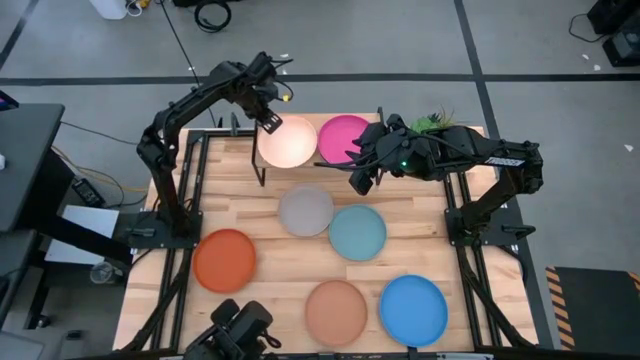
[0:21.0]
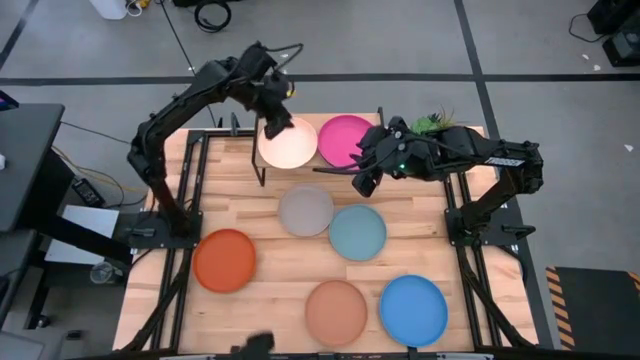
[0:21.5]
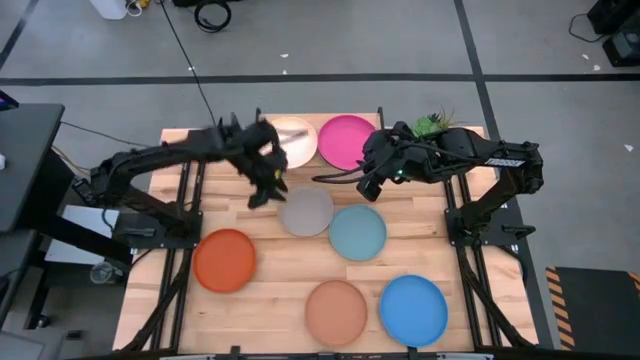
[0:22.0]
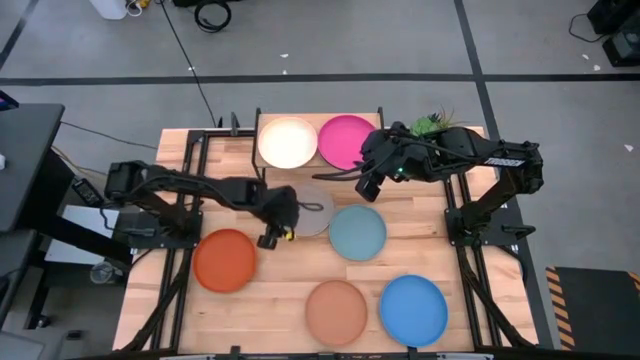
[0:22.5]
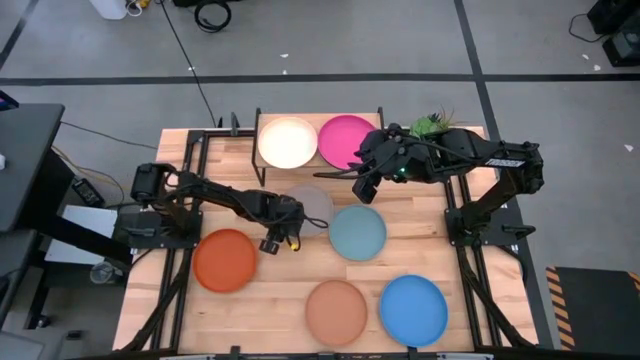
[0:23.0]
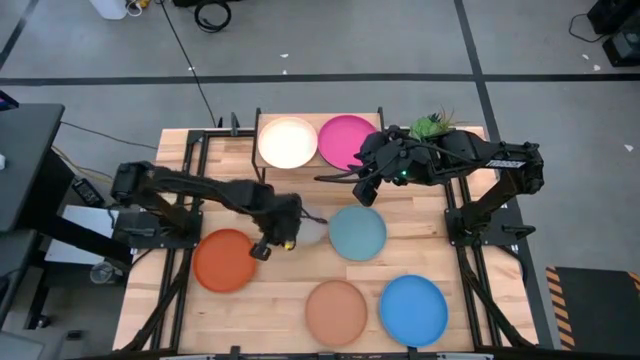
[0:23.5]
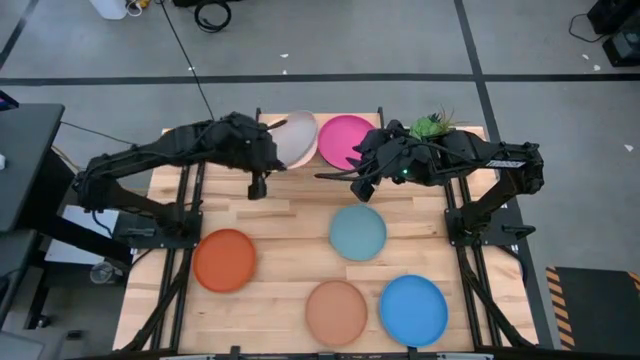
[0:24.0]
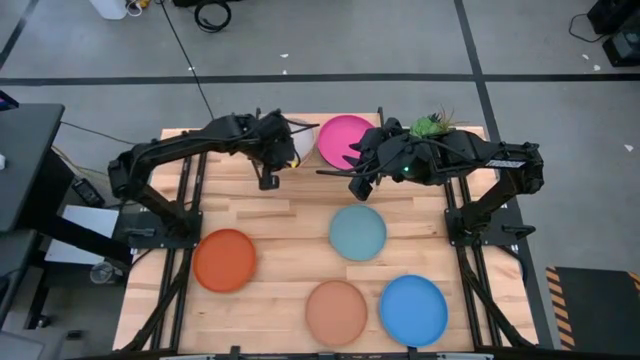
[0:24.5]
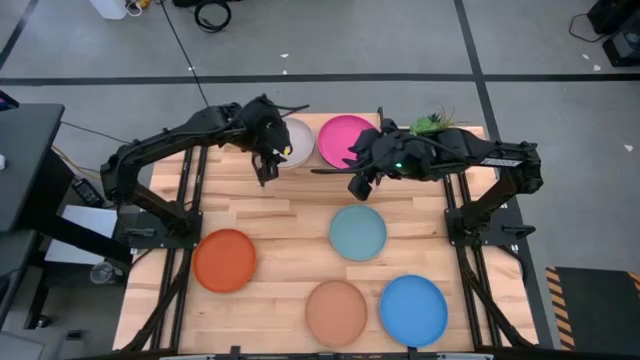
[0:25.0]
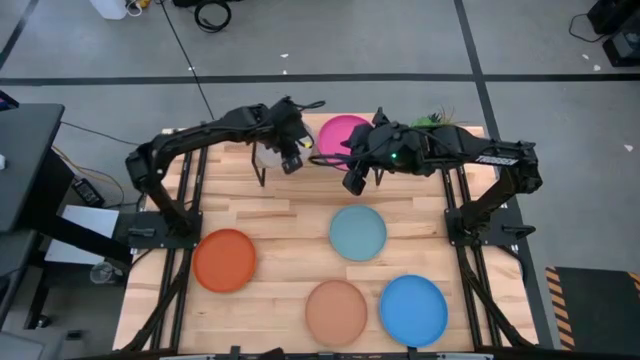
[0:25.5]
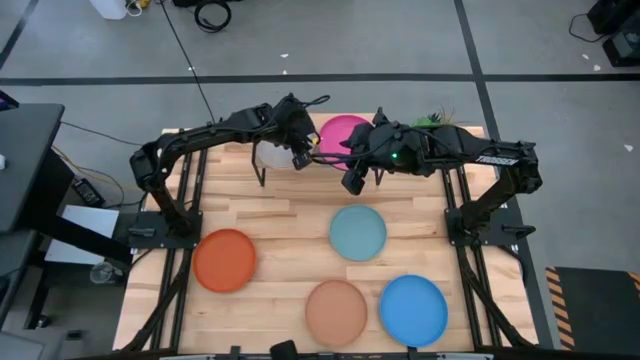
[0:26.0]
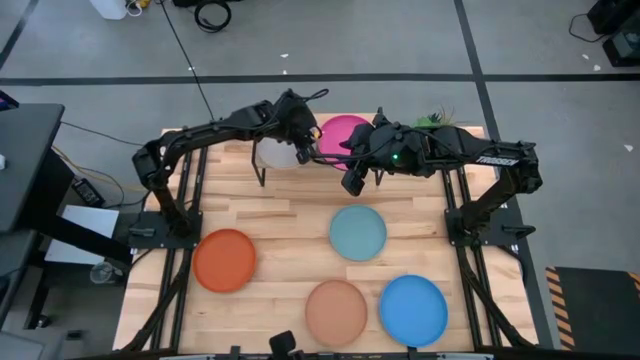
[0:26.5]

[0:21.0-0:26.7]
Task: Place and stack plates onto a shelf
Stack the gray plate on top of the white plate on the shelf

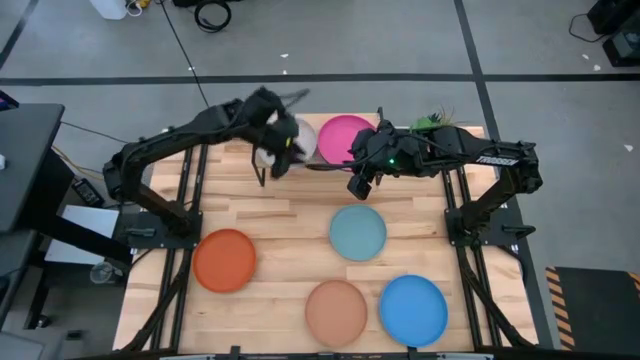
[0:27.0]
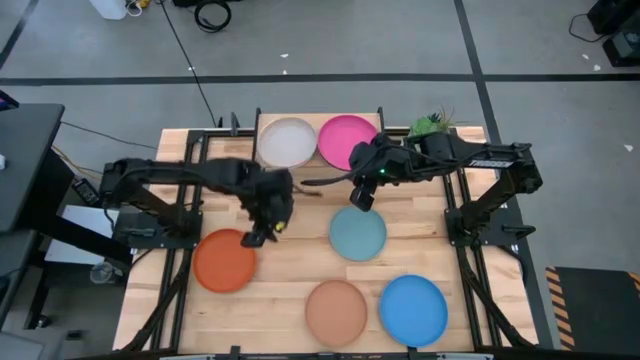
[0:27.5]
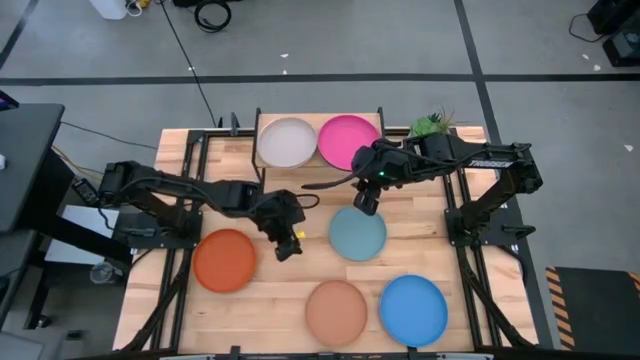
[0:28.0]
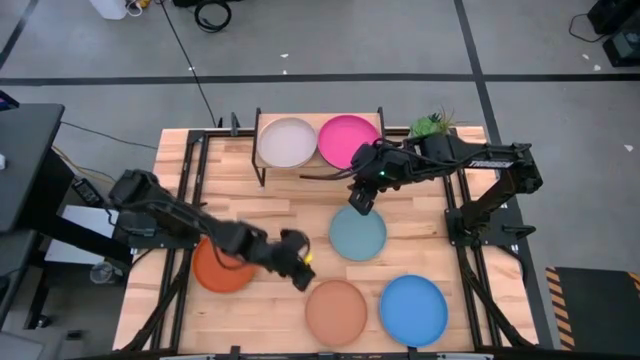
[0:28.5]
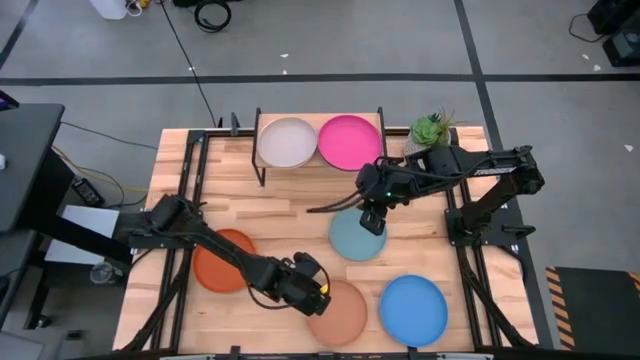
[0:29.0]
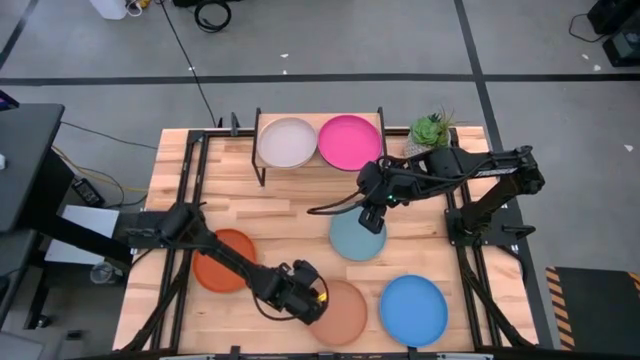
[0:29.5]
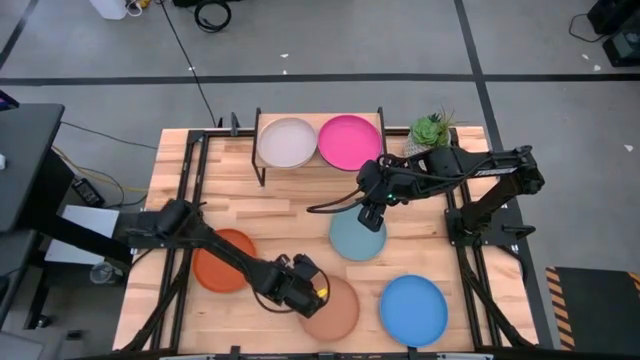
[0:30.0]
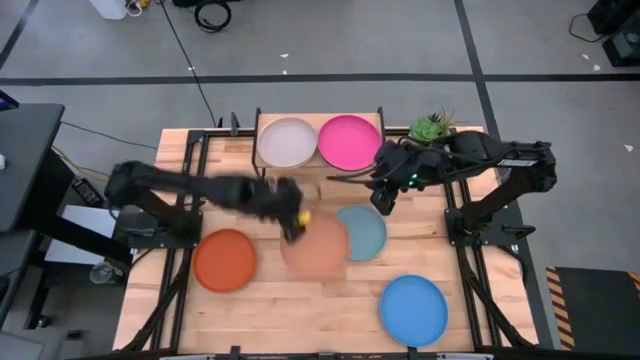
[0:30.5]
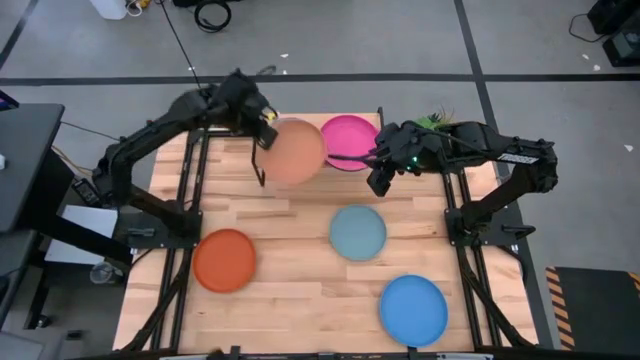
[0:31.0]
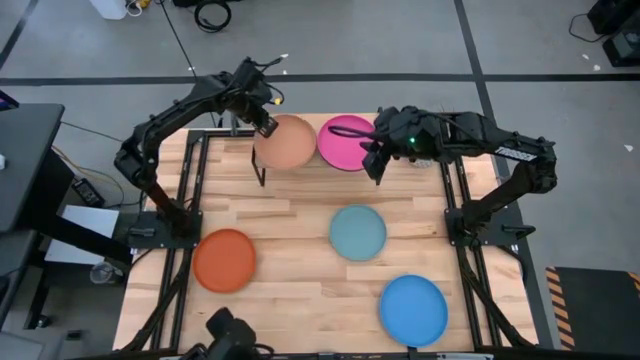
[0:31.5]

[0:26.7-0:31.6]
Stack the brown plate on top of the gray plate on the shelf

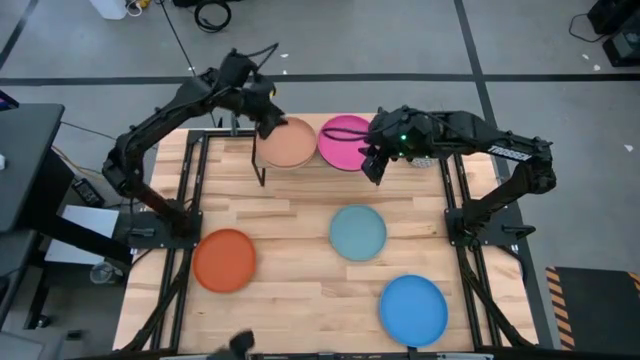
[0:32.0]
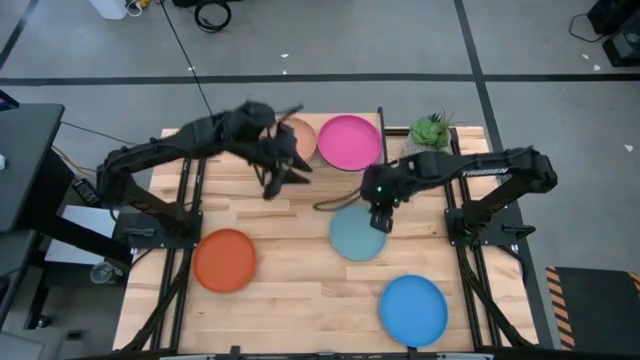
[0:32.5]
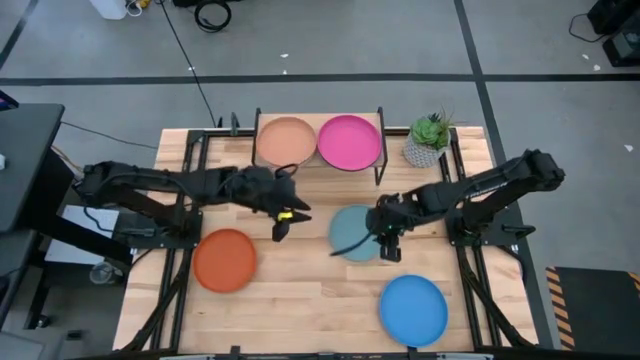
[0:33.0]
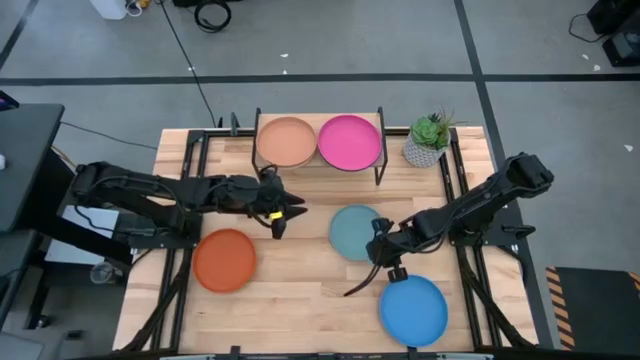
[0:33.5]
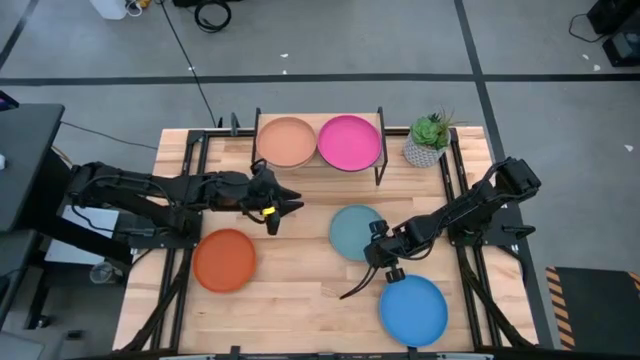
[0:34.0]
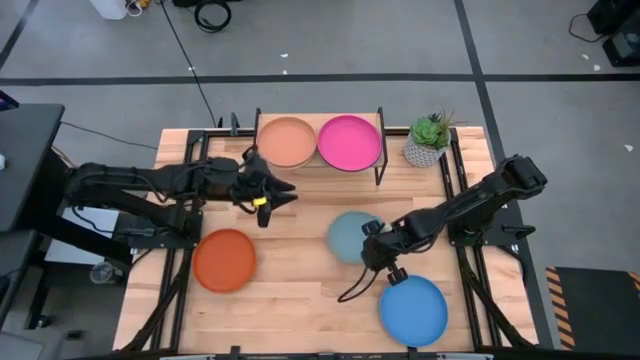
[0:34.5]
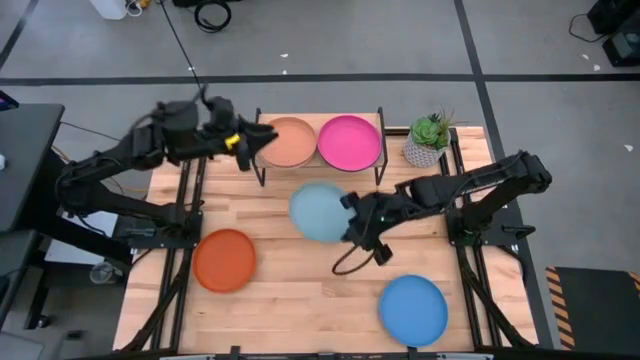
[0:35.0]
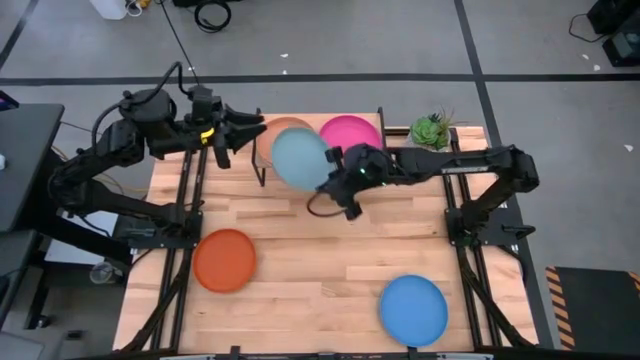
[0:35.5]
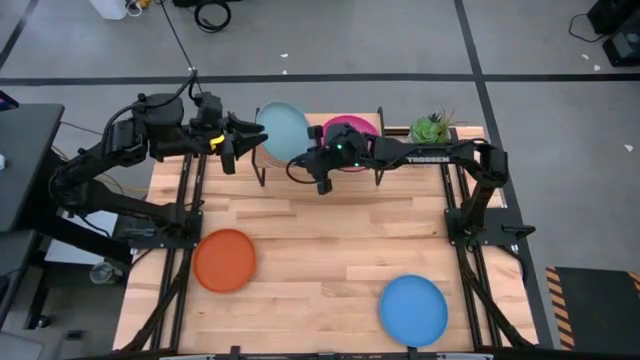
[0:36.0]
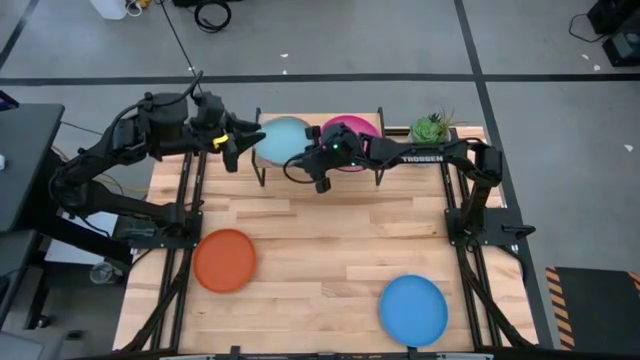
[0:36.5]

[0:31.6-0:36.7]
Stack the light blue plate on top of the brown plate on the shelf

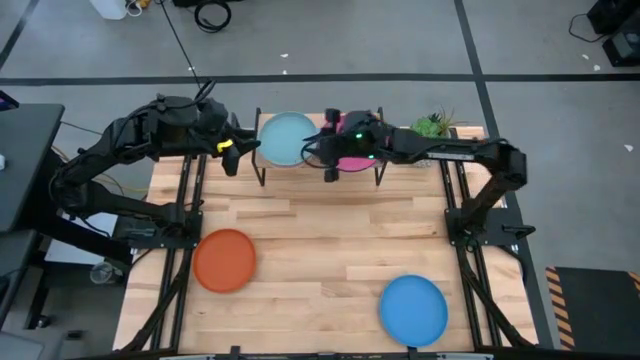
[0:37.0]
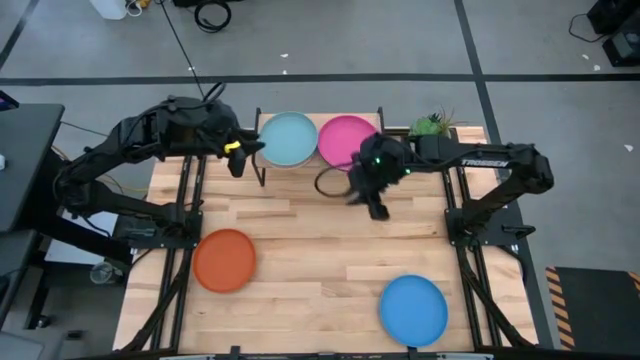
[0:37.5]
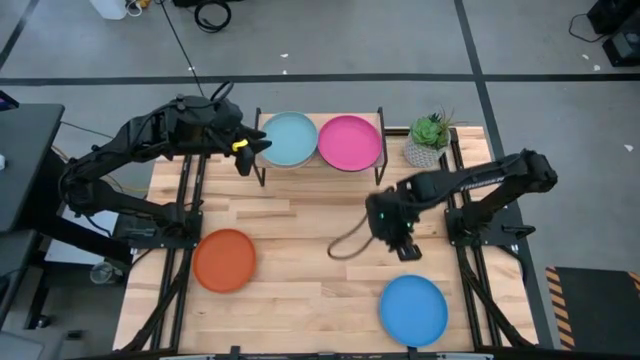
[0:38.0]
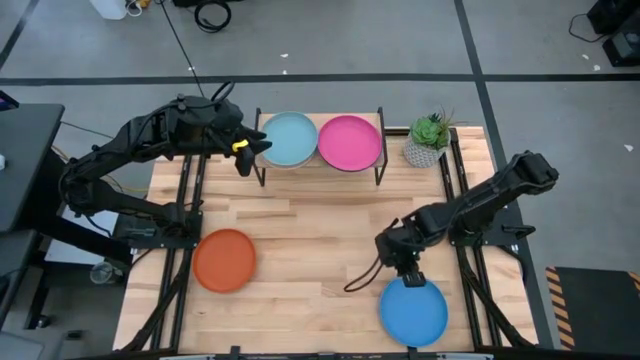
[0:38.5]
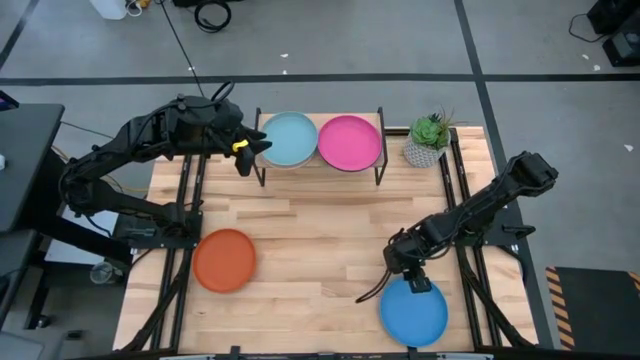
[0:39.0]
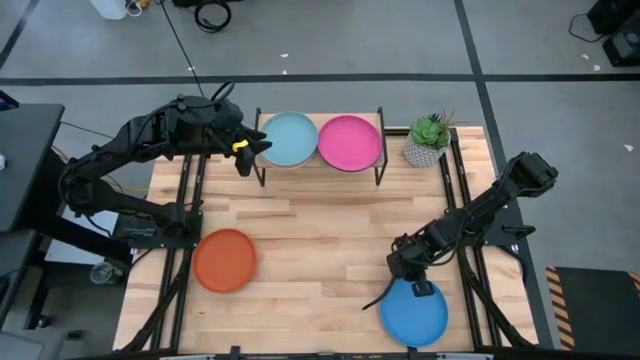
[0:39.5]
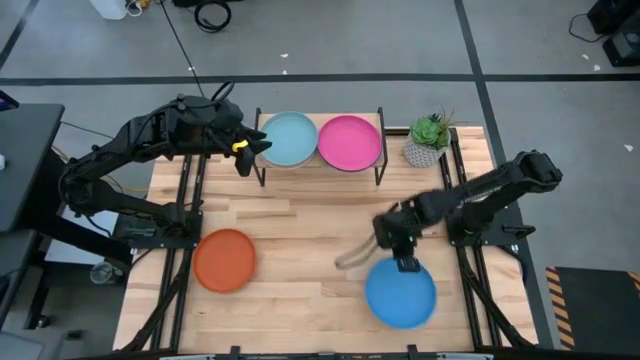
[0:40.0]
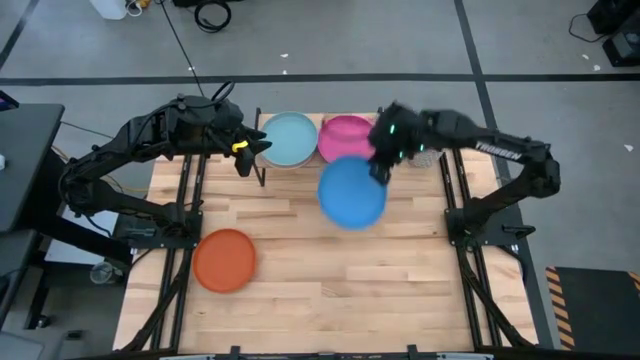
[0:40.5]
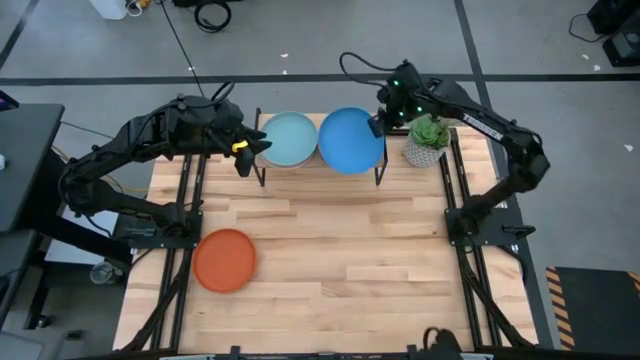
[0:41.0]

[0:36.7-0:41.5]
Stack the blue plate on top of the pink plate on the shelf

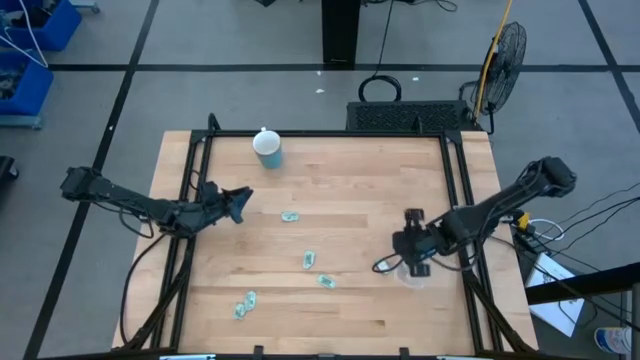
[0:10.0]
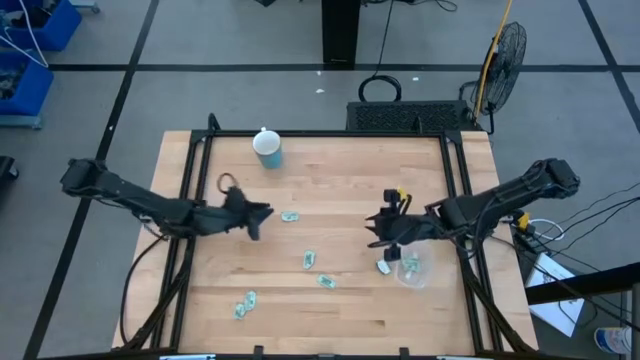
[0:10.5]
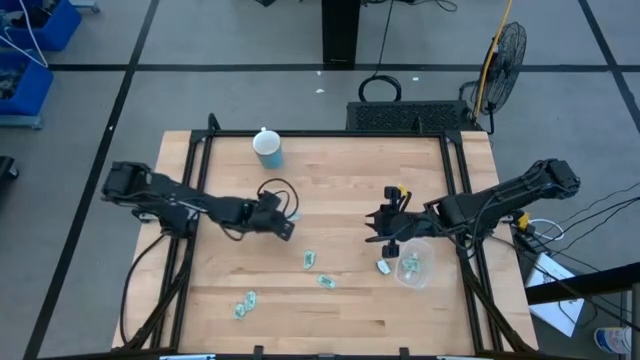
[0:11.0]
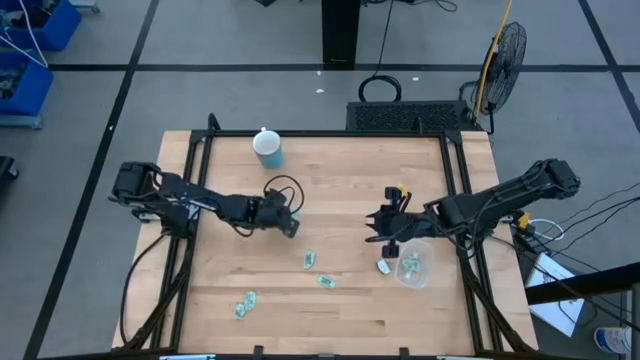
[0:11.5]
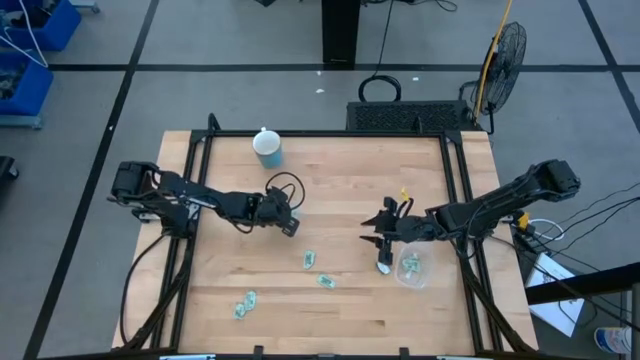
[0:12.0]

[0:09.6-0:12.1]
Task: Pick and place Stevia / Truvia into bins
Put the stevia packet into the transparent container
